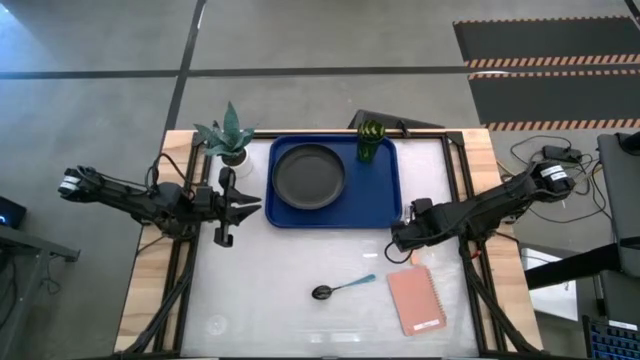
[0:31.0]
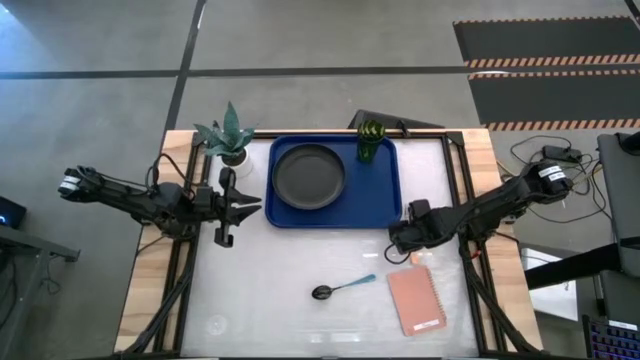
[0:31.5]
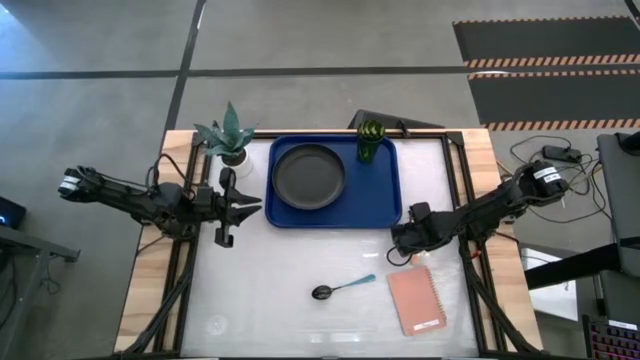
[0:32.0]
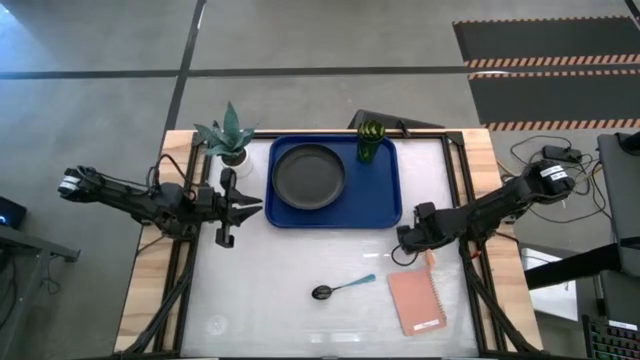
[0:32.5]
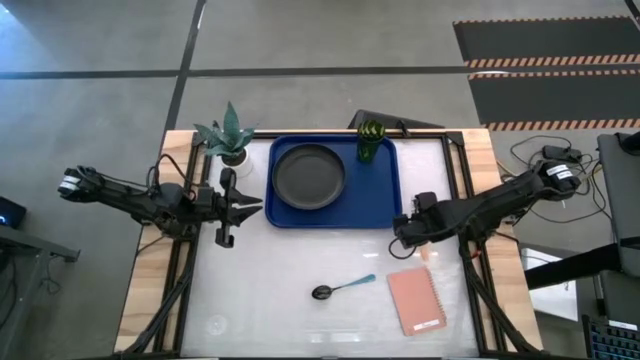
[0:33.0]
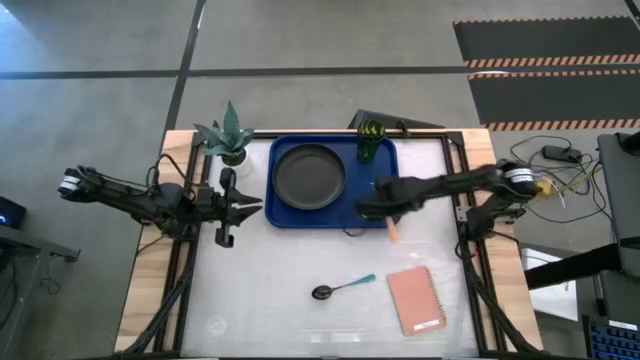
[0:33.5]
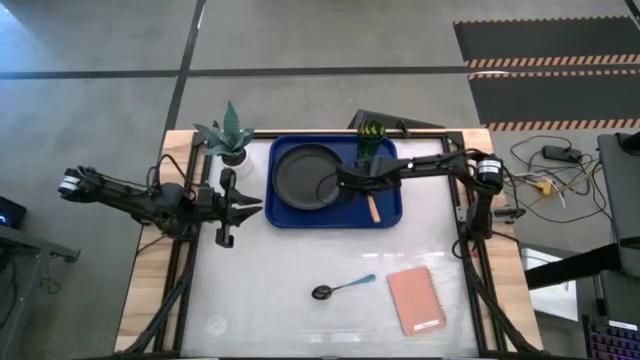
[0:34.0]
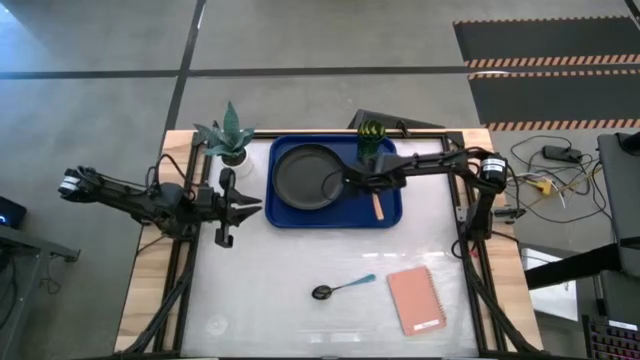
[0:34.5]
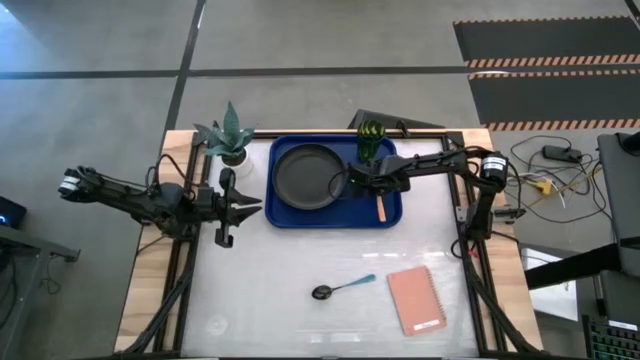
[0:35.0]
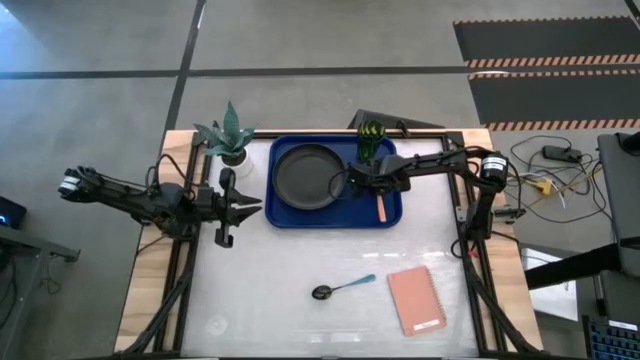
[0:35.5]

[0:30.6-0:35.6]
Task: Pick and place plate/cup/fork/spoon on tray
Put the orange fork to the bottom of the green cup on the blue tray

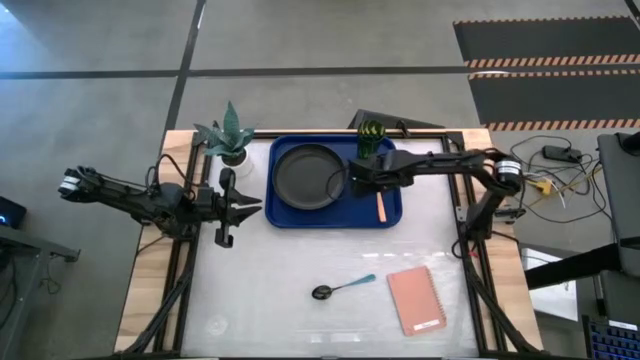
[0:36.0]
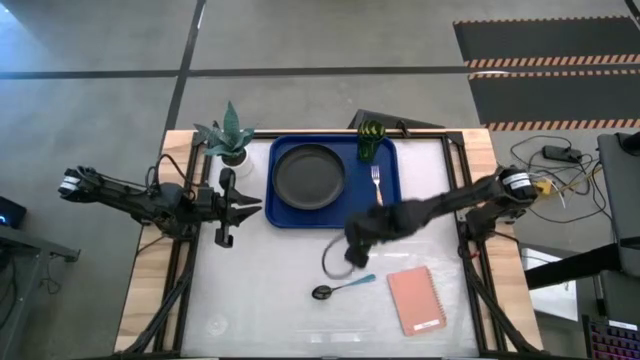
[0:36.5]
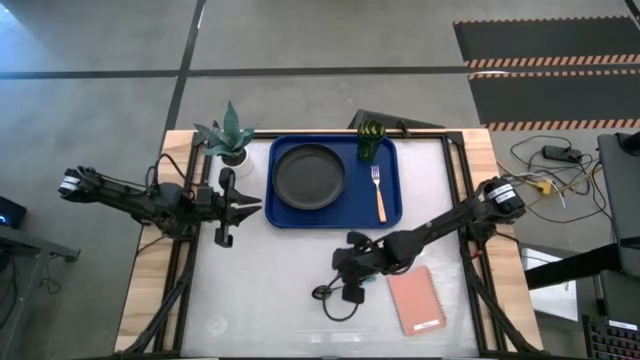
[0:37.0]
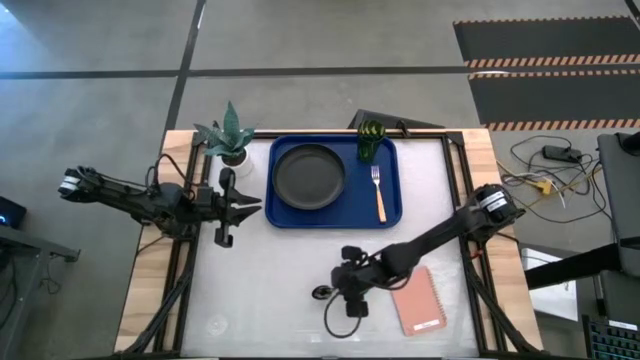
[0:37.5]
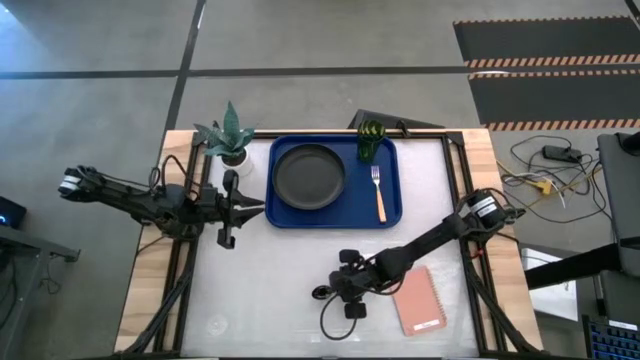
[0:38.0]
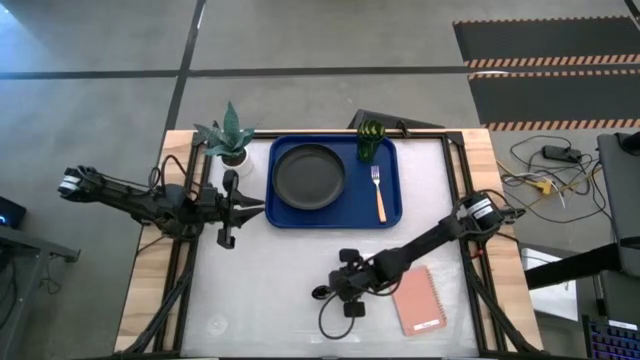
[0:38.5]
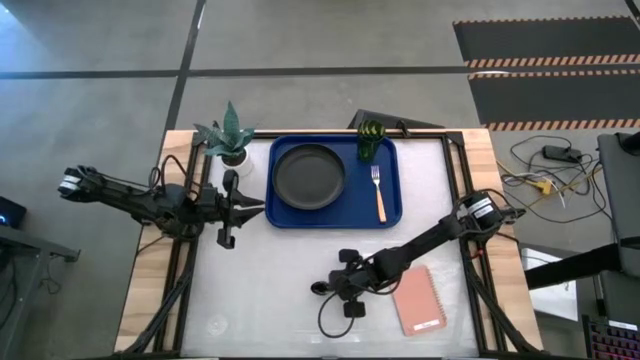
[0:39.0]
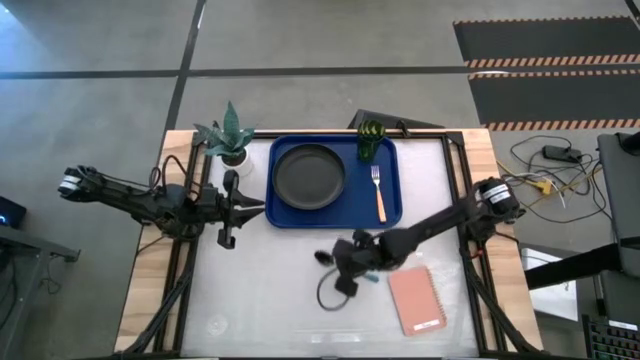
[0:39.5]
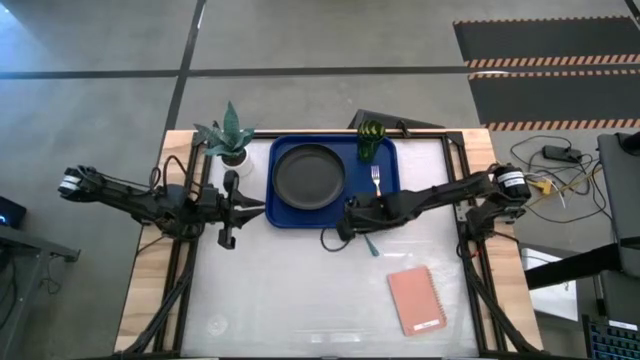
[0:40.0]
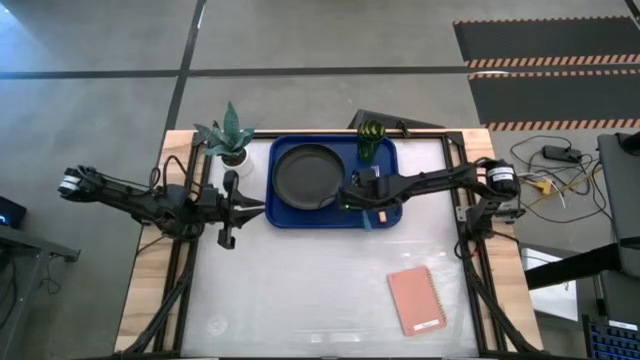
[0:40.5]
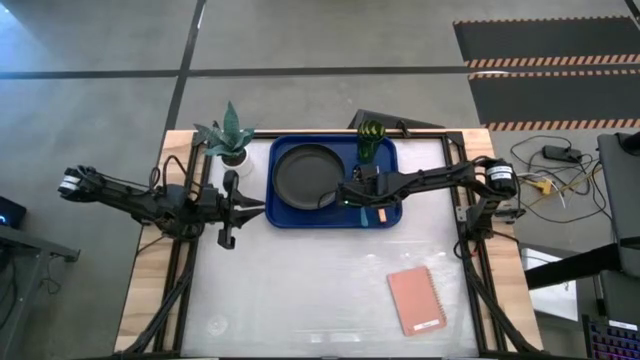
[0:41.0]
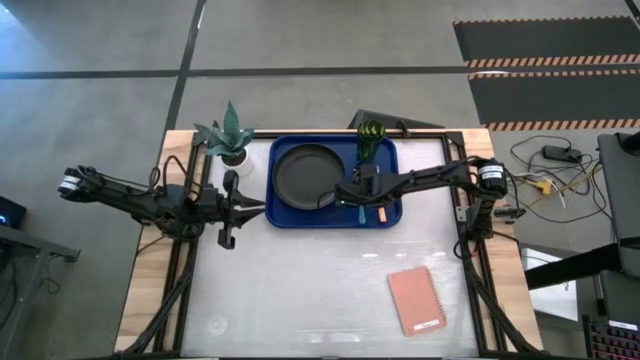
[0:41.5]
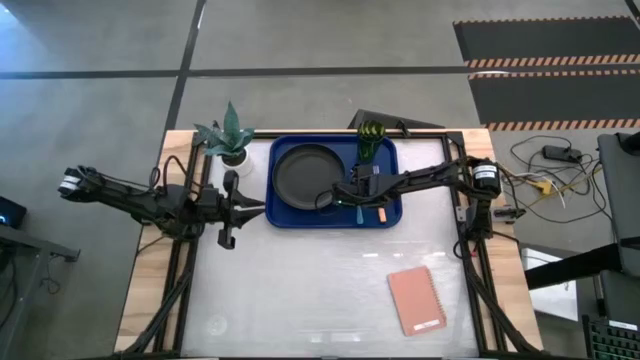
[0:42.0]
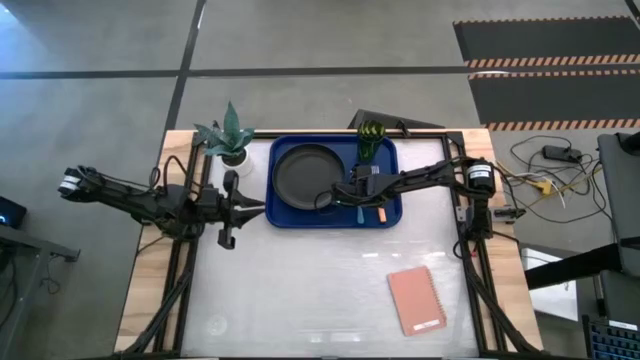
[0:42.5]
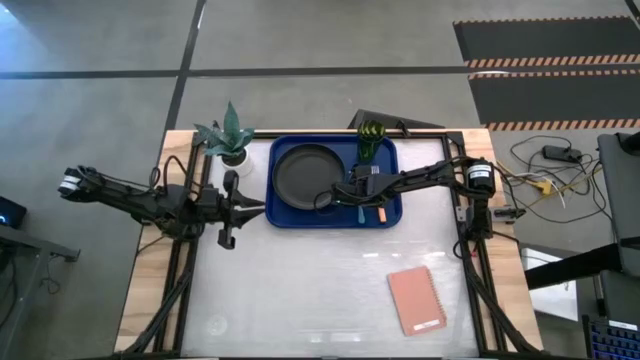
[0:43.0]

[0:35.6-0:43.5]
Put the blue spoon in between of the black plate and orange fork on the blue tray

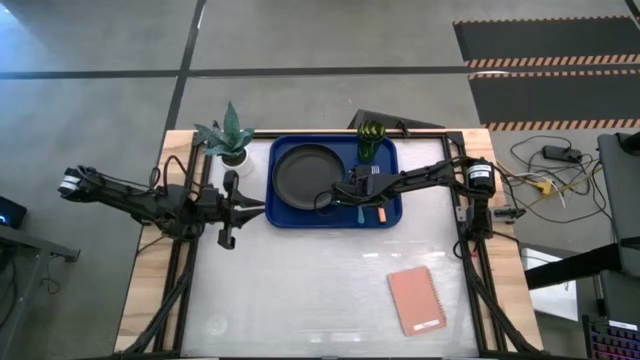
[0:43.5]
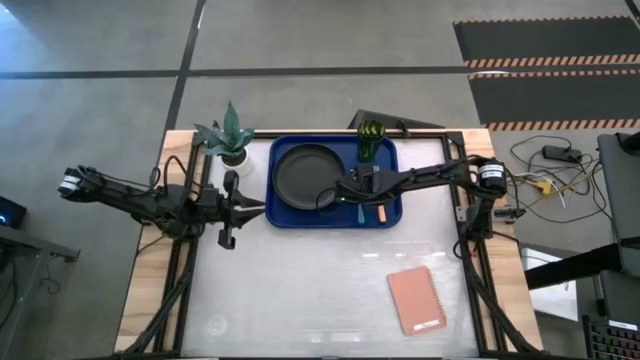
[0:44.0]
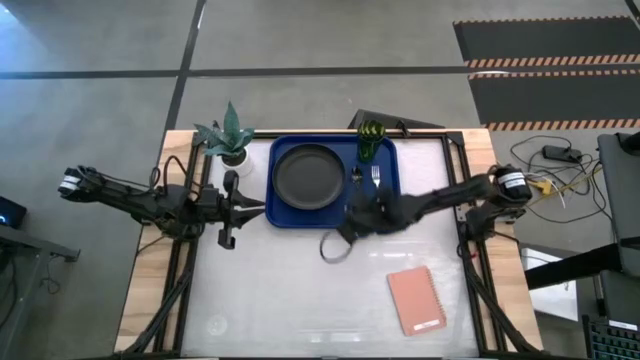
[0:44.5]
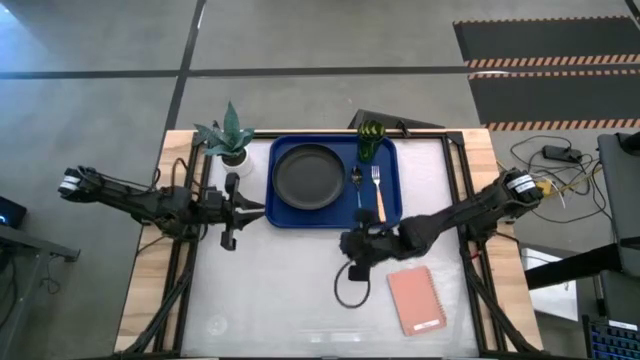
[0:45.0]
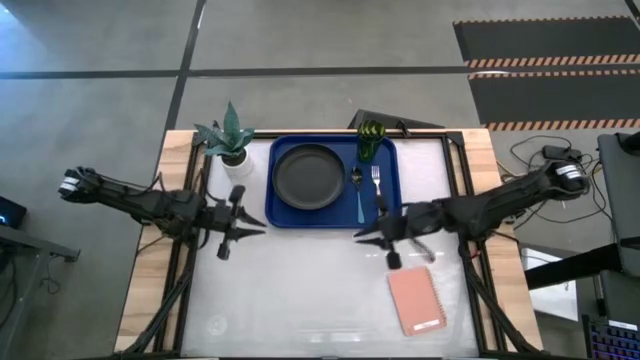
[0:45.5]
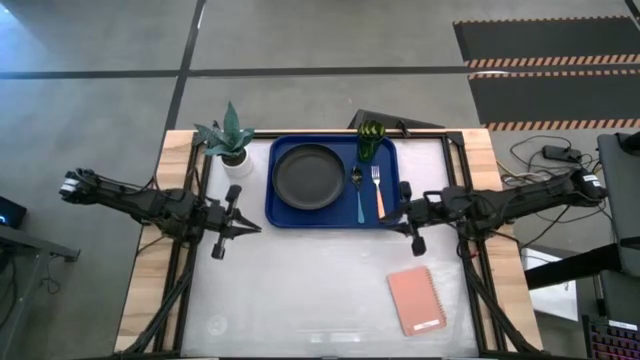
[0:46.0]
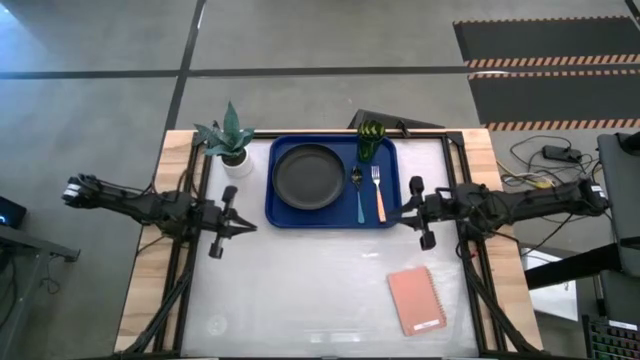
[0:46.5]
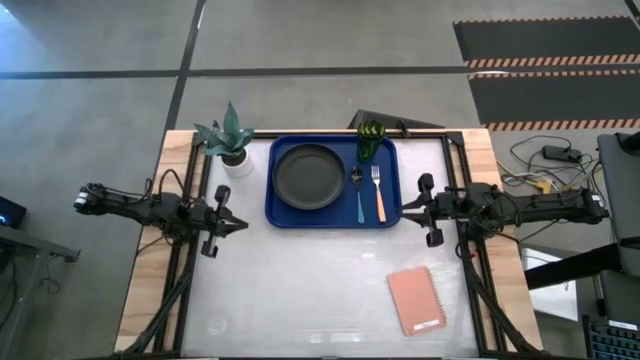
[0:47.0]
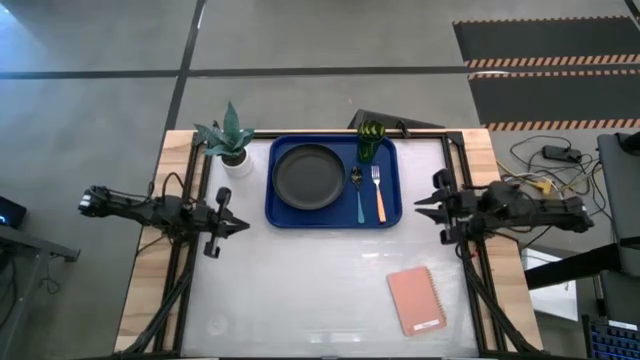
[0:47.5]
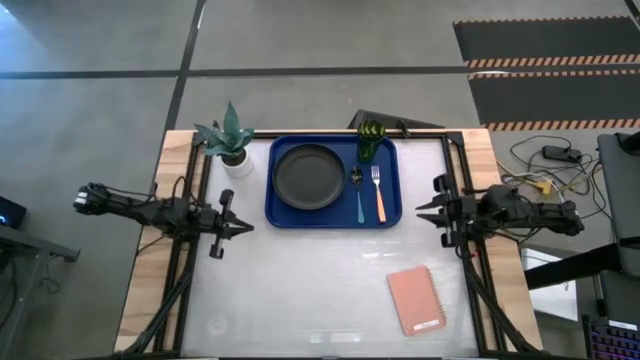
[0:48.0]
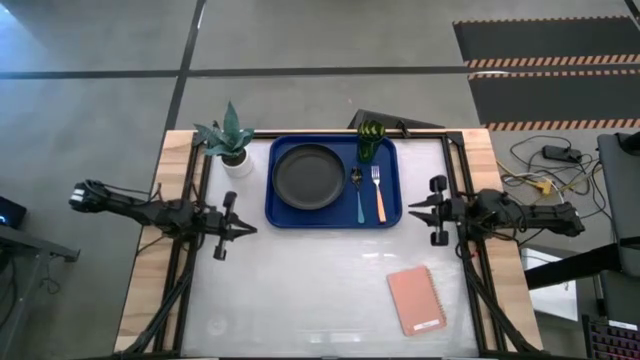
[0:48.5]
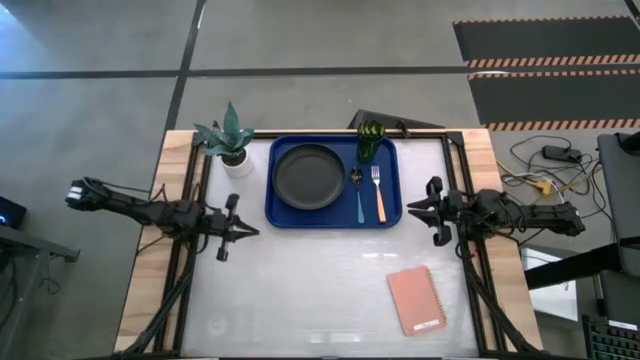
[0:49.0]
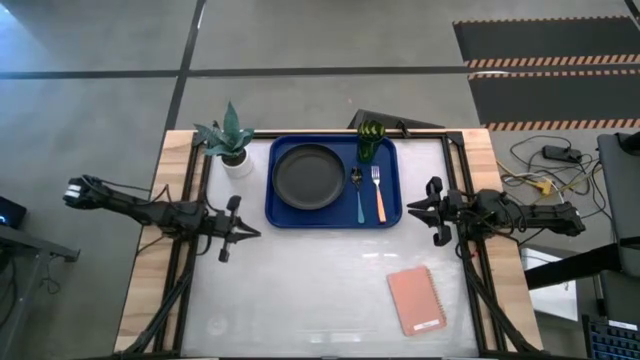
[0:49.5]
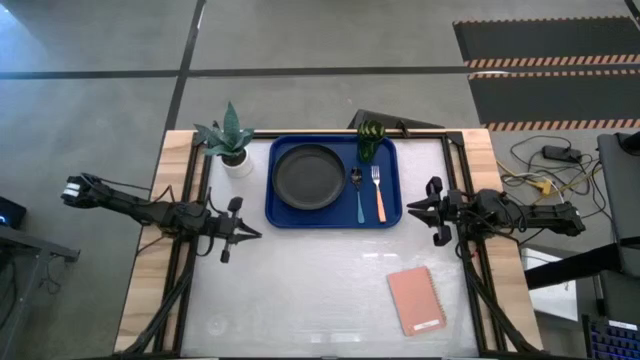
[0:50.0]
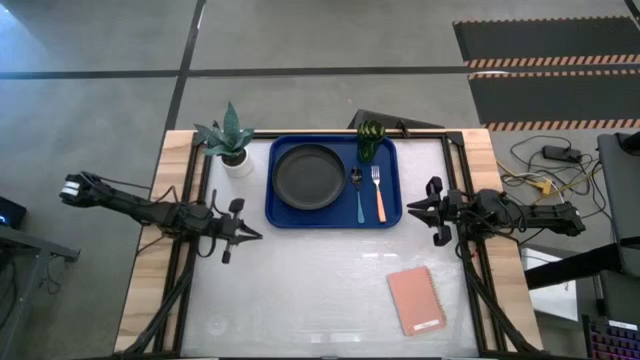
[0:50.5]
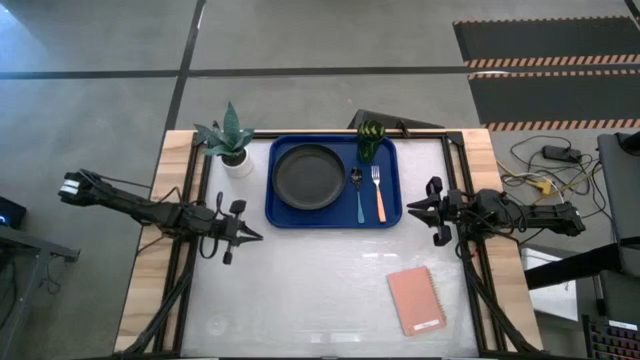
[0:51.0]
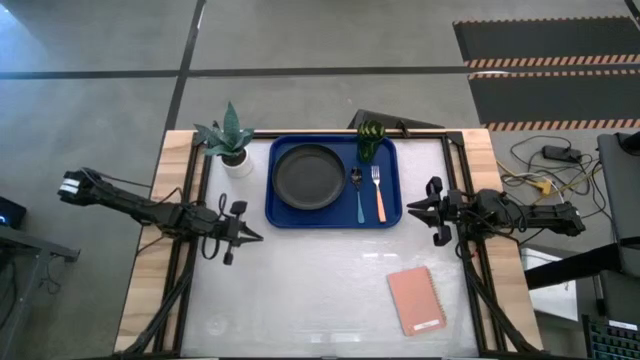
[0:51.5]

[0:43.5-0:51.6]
Return to Home Position

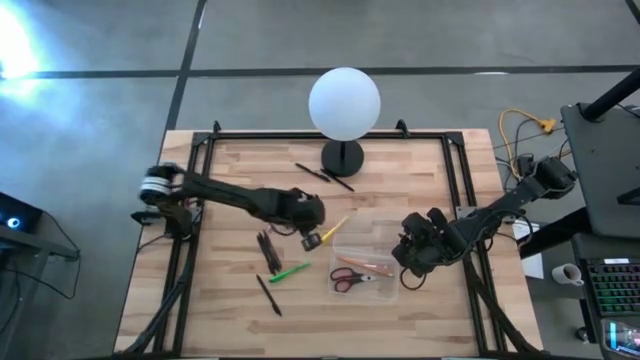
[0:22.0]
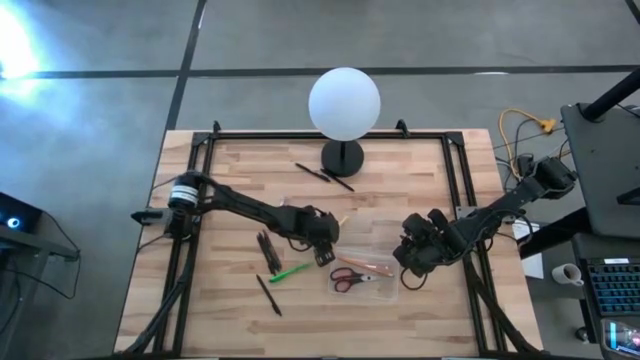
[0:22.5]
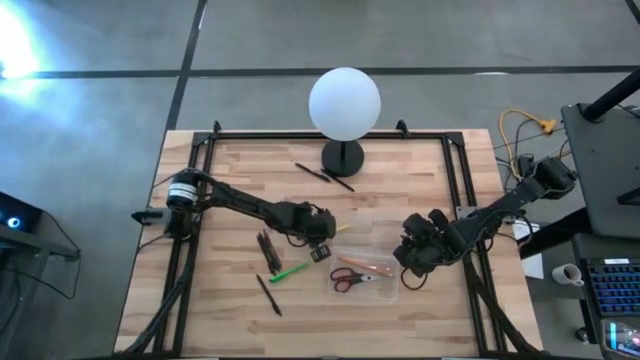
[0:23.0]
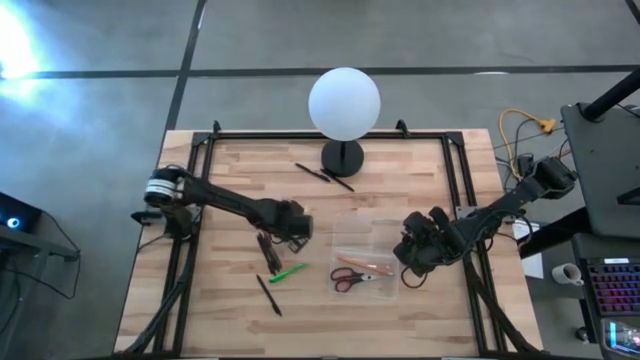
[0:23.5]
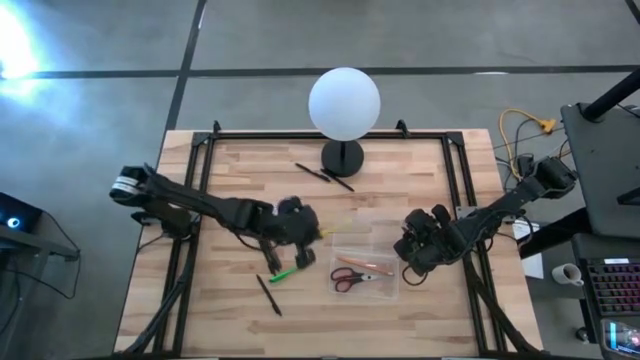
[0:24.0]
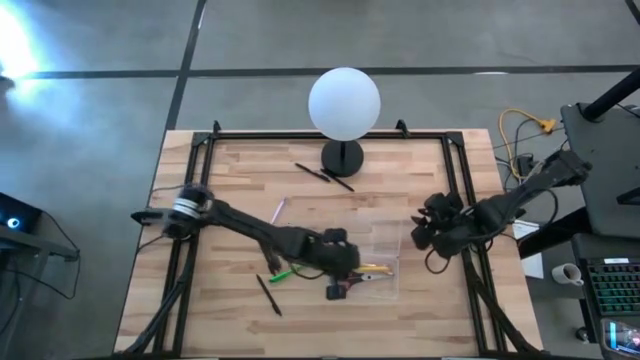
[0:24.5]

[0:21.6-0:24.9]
Task: Pick & place school supplies into a supply box
Put the yellow pen into the transparent supply box
